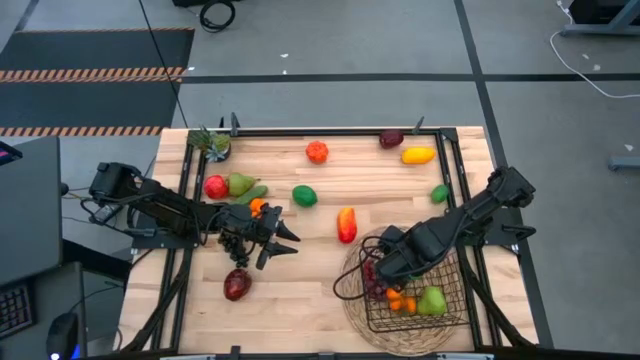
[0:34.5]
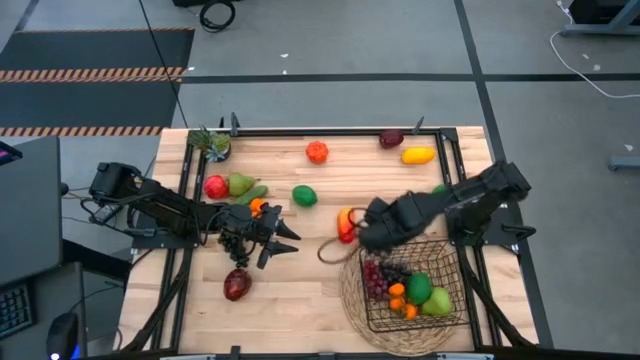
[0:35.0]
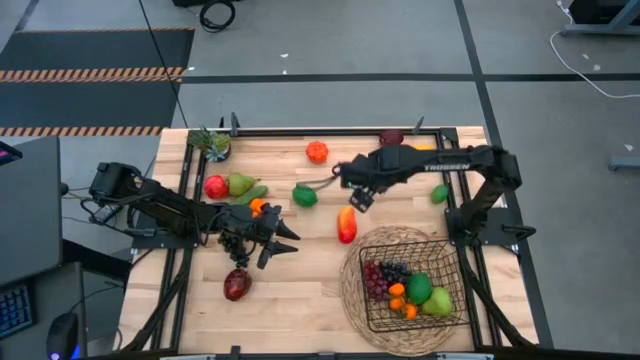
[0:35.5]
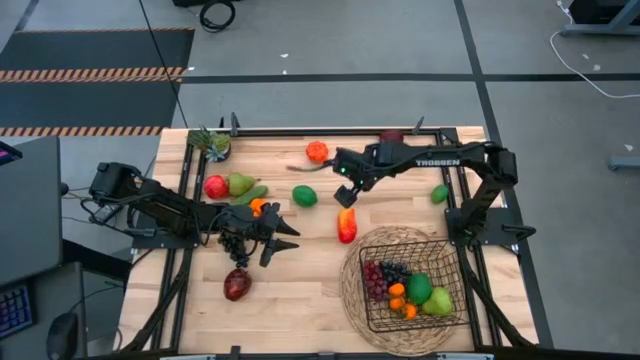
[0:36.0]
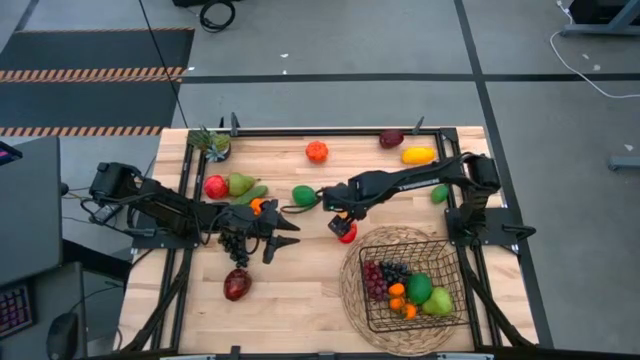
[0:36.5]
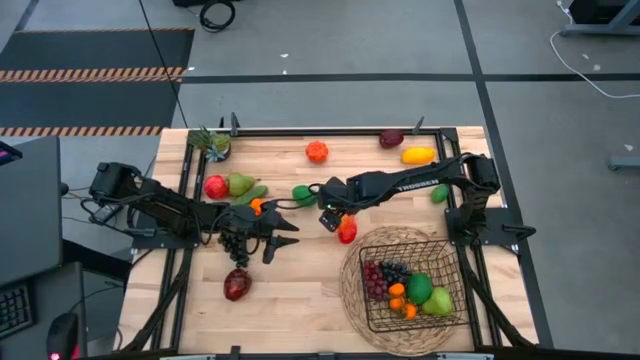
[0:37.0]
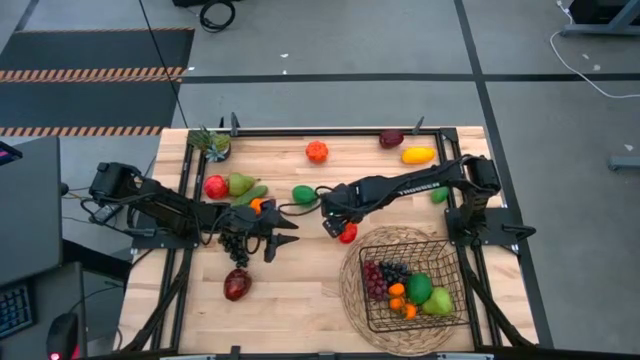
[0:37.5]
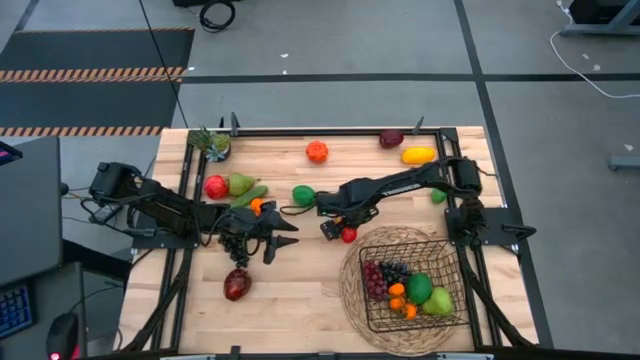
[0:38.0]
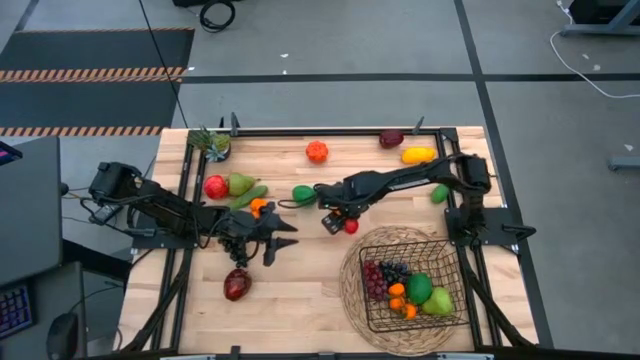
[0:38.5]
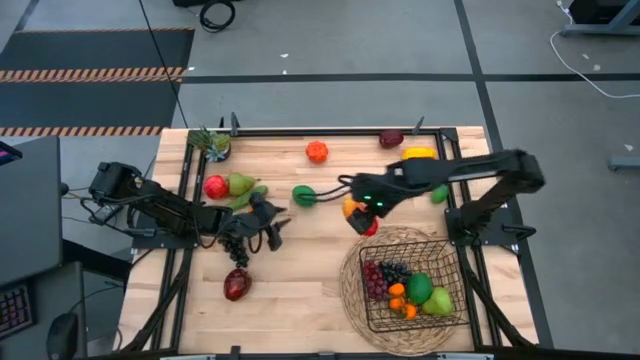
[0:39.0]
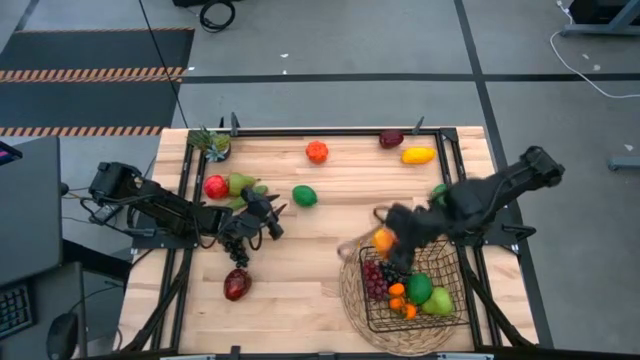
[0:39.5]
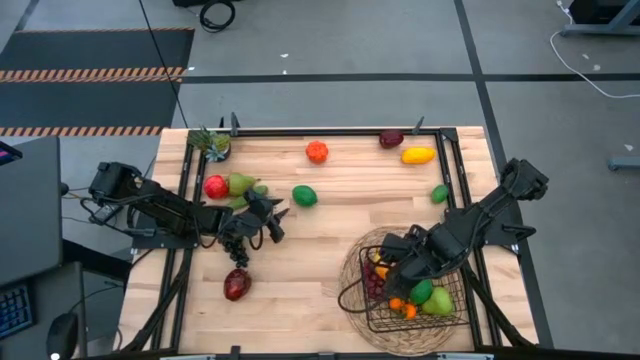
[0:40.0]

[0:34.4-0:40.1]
Task: Build produce basket
Put the orange mango into the black wire basket

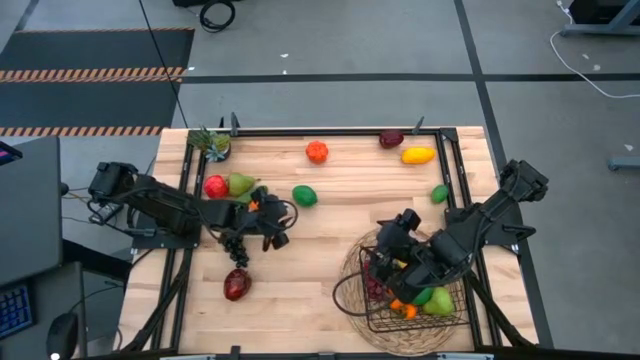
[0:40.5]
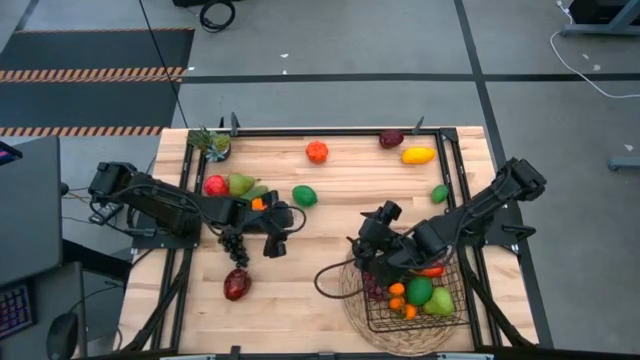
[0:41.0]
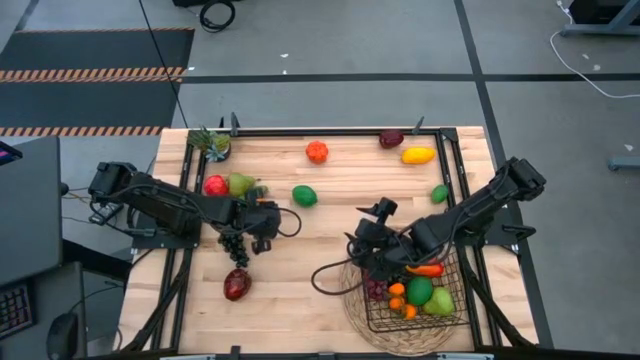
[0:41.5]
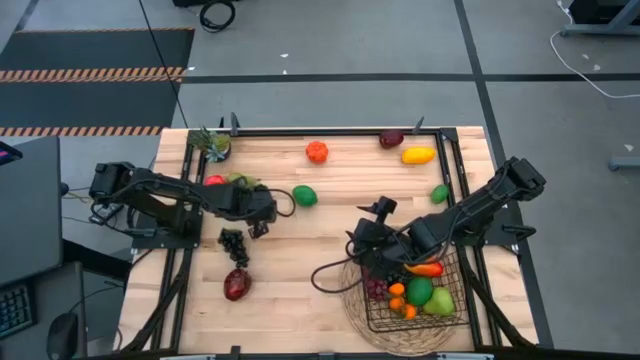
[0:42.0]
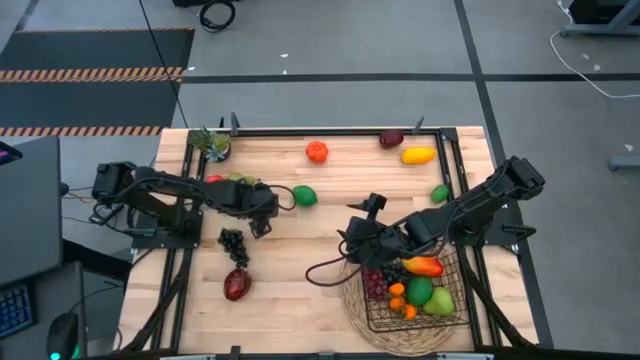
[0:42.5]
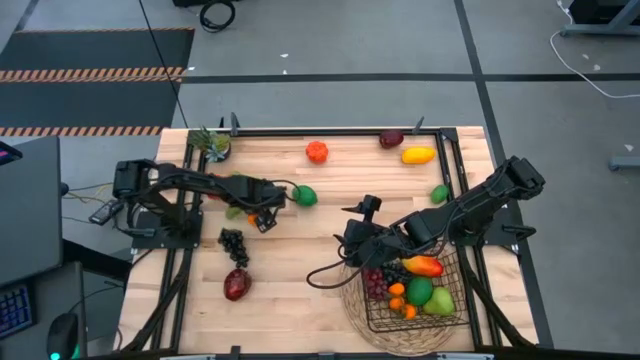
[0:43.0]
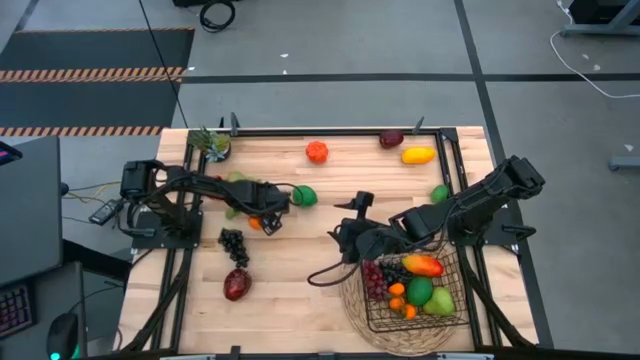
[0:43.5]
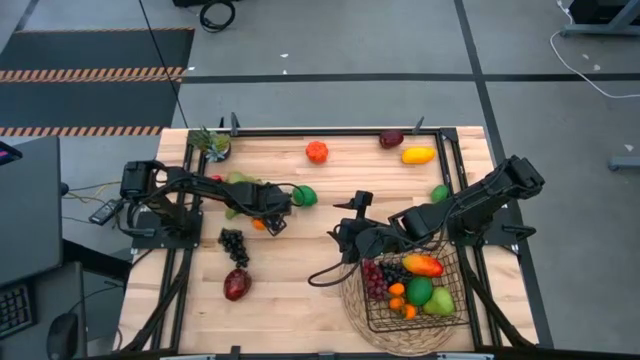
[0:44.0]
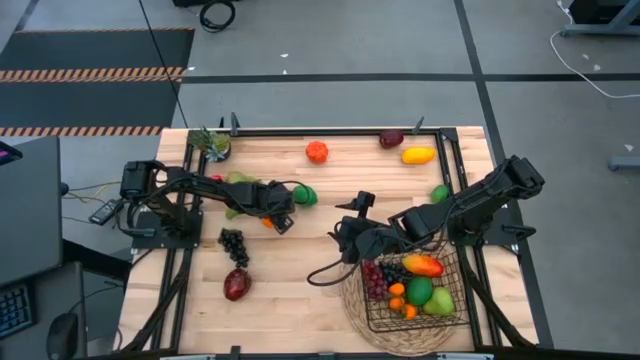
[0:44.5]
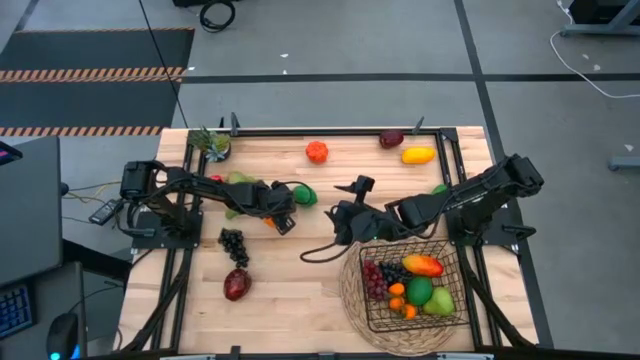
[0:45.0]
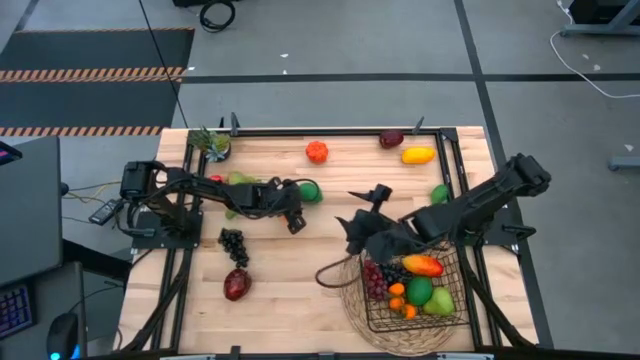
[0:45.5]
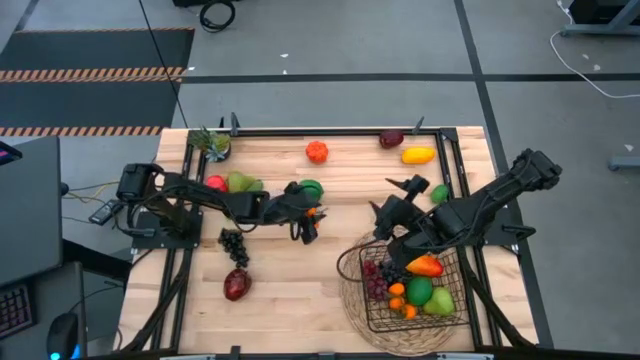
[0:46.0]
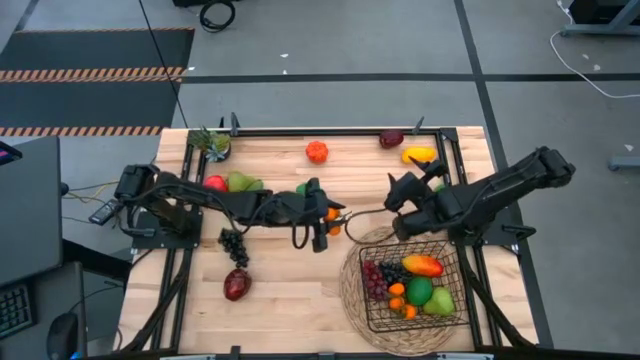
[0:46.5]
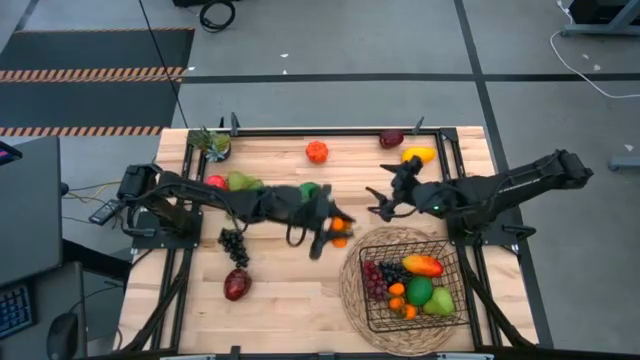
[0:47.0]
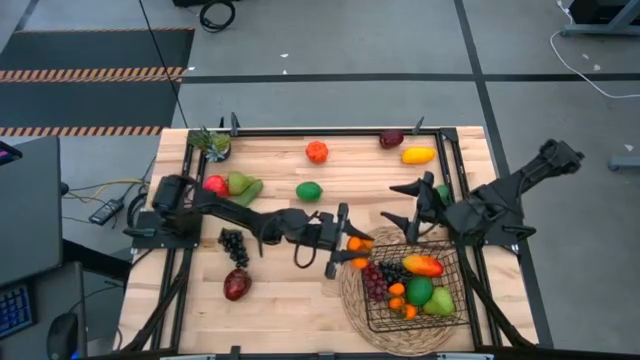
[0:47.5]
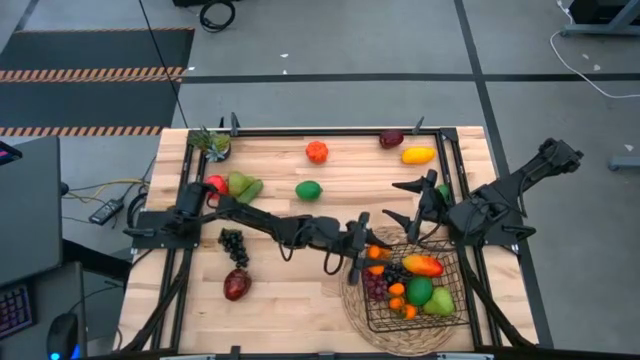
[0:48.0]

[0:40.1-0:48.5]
Put the orange tangerines into the black wire basket

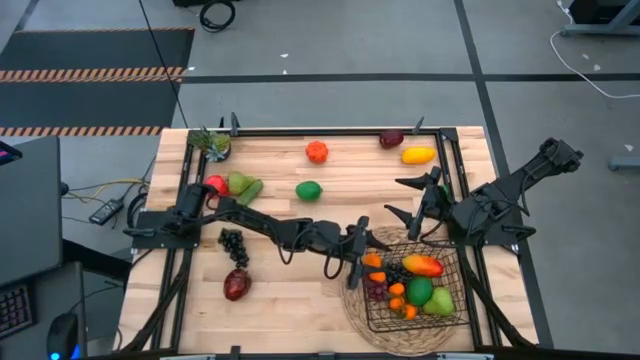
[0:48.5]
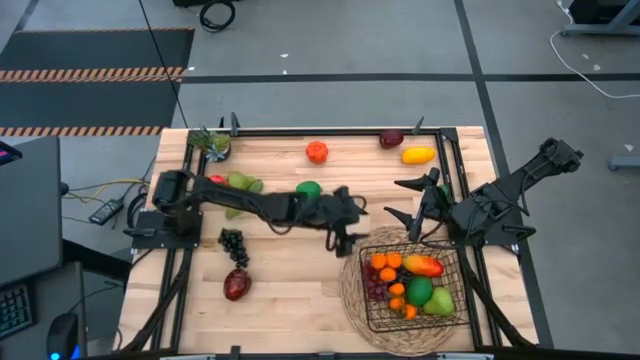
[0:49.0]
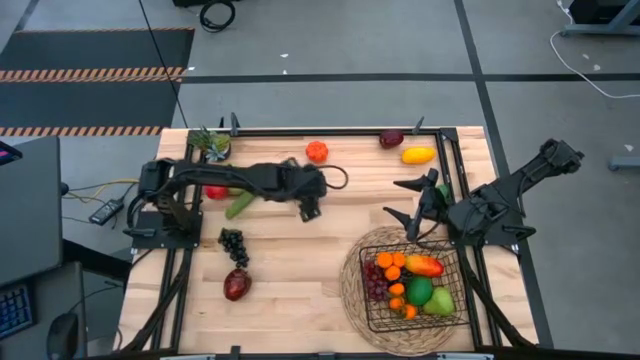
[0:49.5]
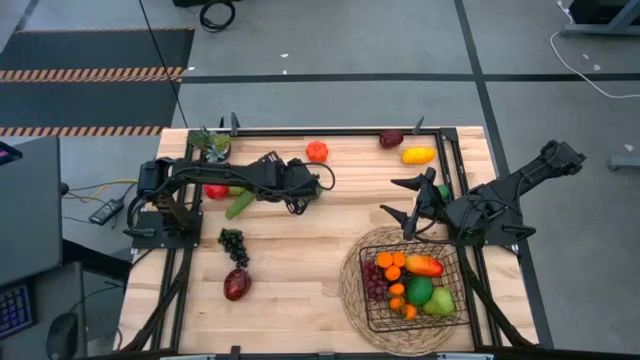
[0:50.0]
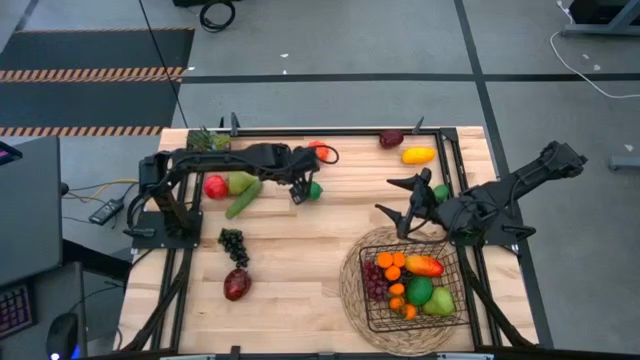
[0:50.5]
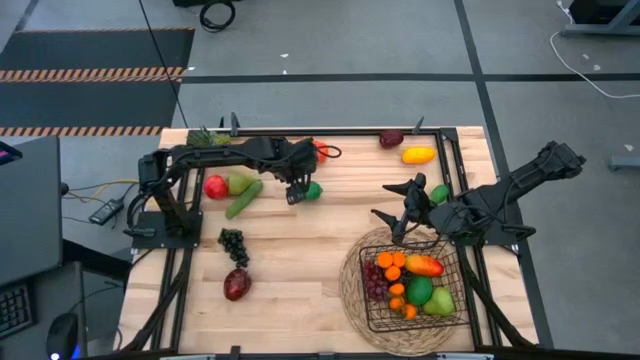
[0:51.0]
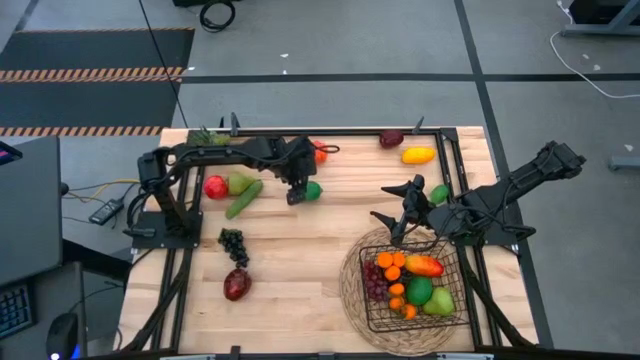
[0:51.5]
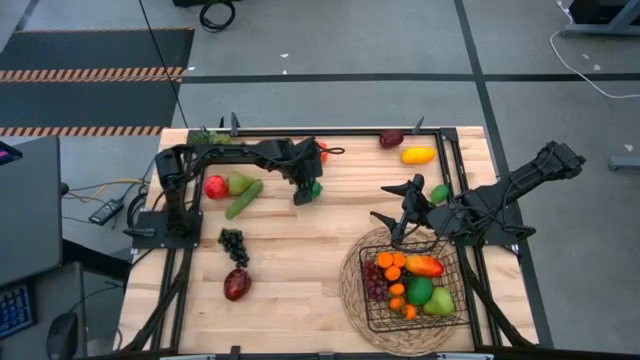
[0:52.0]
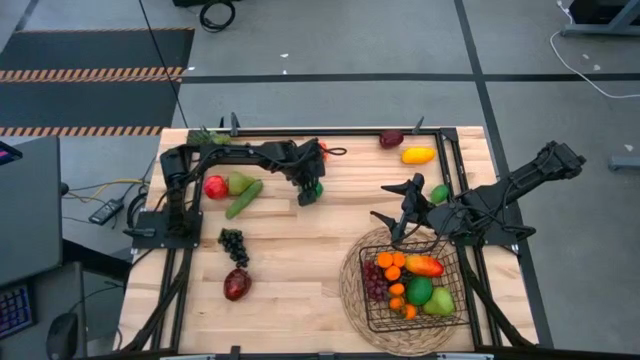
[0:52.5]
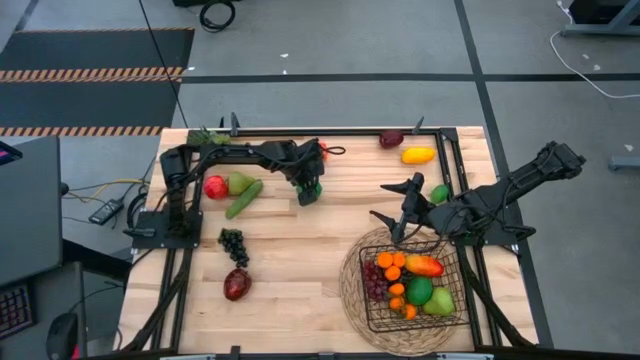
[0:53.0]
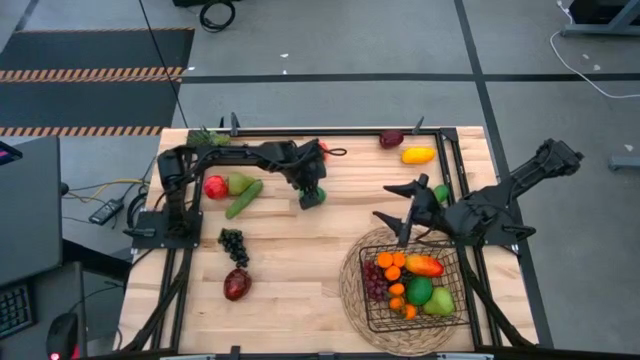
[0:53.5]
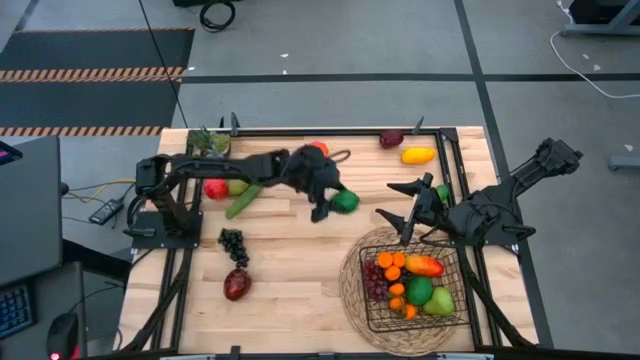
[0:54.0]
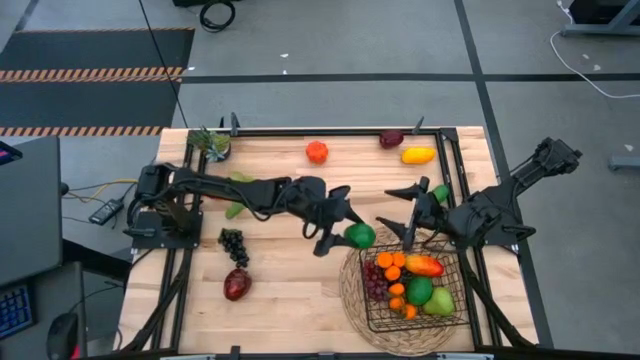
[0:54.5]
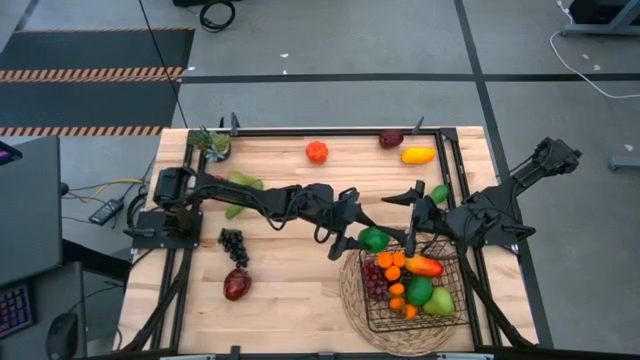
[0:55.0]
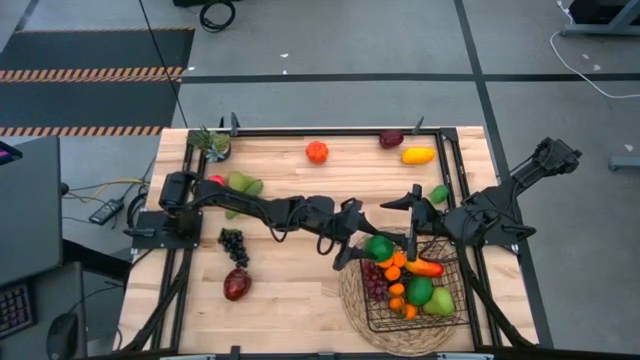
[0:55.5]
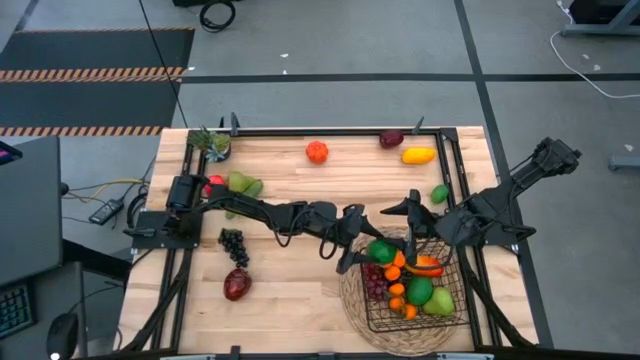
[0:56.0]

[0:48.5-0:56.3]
Put the left green lime into the black wire basket

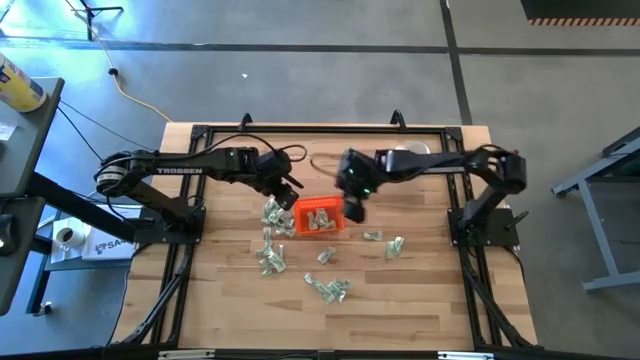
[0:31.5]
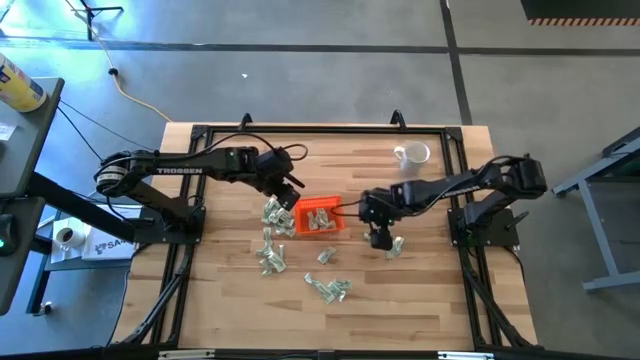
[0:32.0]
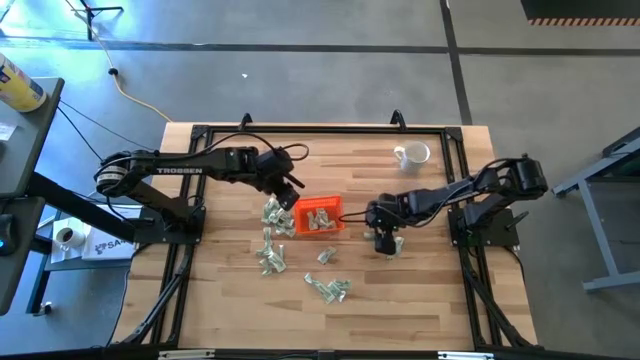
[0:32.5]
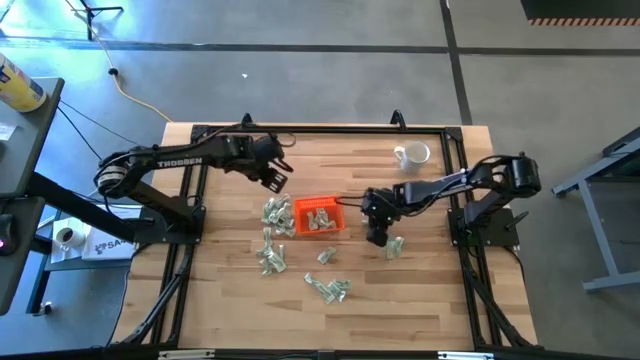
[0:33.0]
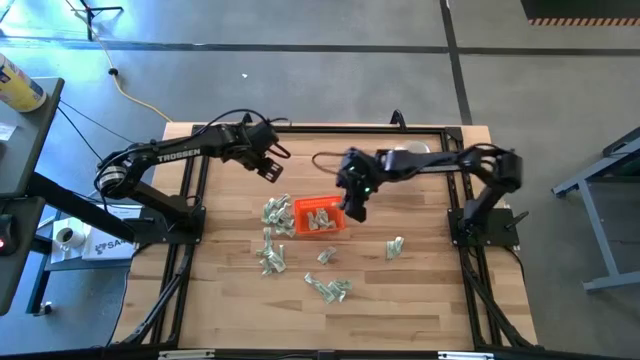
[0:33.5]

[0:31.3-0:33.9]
Task: Pick and place Stevia / Truvia into bins
Put the stevia packet into the orange bin
